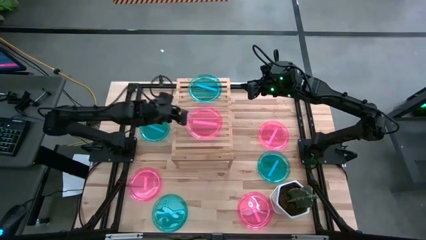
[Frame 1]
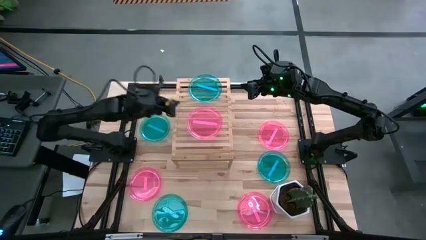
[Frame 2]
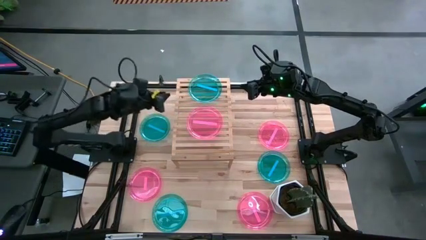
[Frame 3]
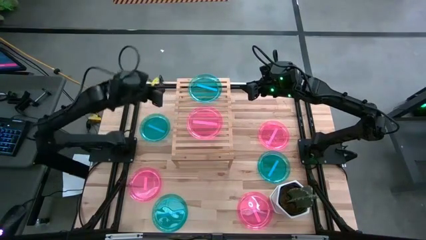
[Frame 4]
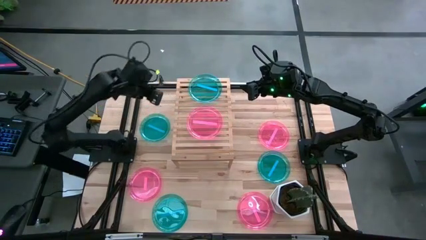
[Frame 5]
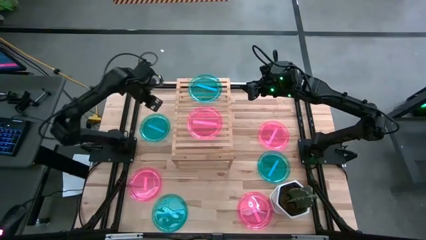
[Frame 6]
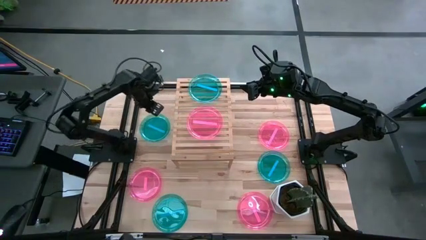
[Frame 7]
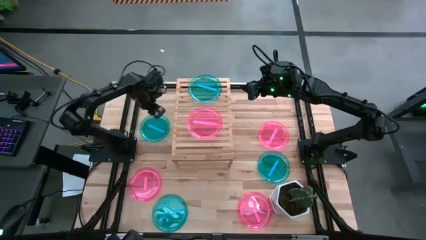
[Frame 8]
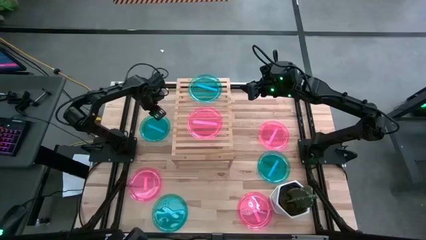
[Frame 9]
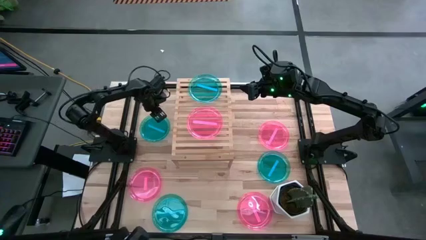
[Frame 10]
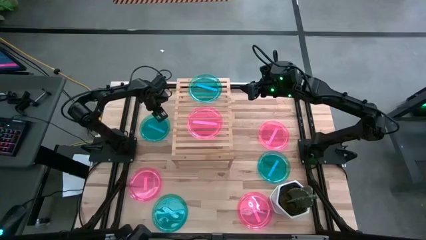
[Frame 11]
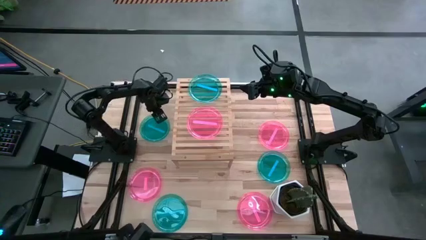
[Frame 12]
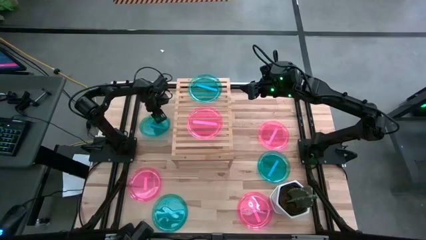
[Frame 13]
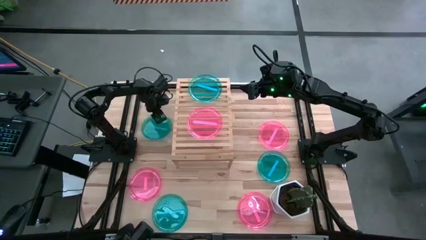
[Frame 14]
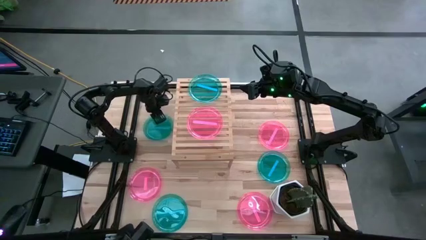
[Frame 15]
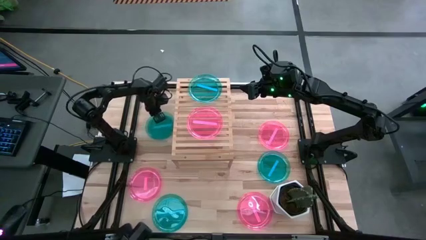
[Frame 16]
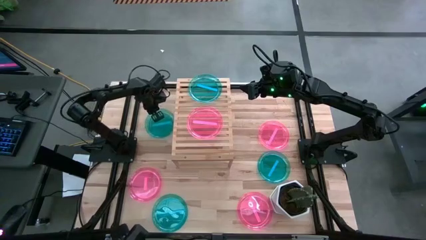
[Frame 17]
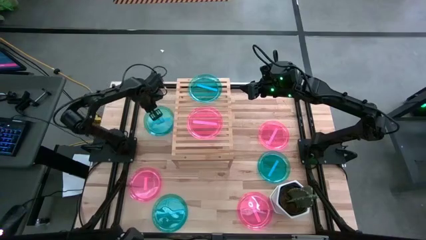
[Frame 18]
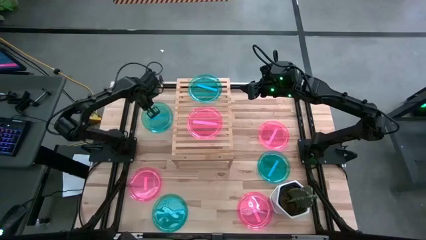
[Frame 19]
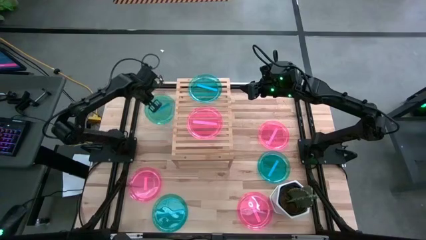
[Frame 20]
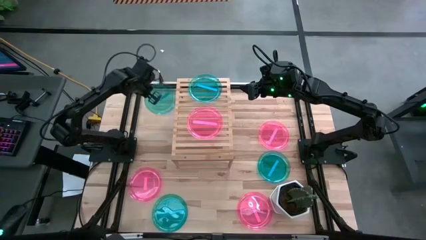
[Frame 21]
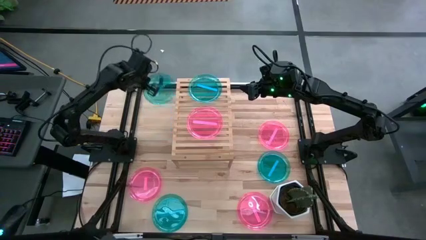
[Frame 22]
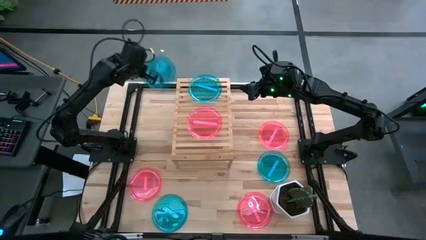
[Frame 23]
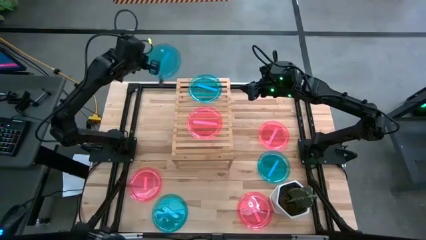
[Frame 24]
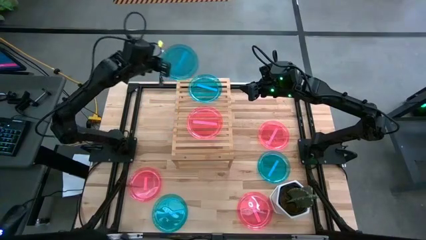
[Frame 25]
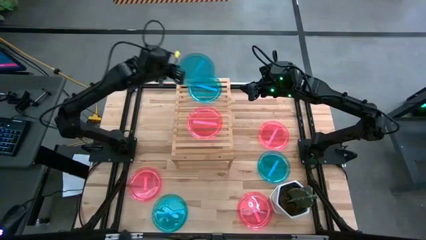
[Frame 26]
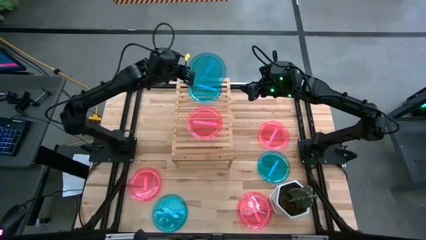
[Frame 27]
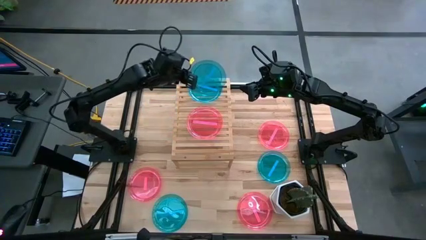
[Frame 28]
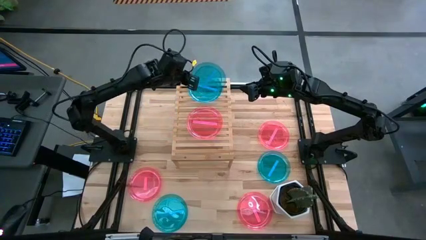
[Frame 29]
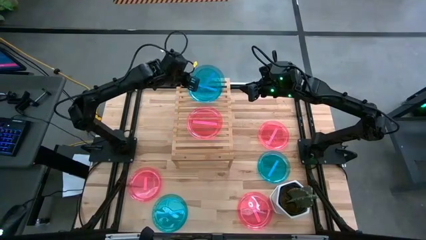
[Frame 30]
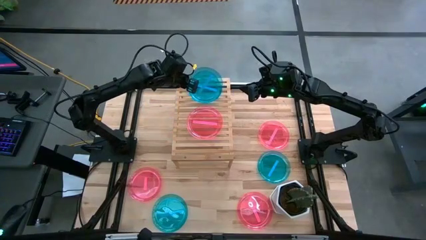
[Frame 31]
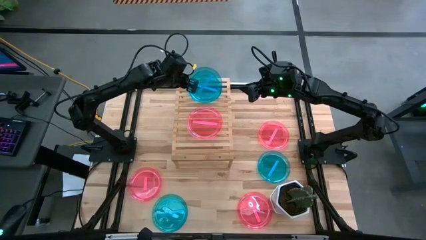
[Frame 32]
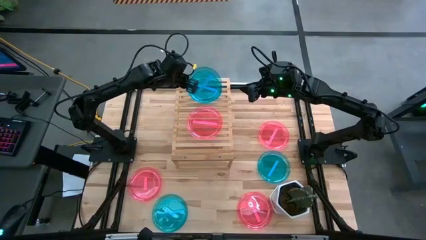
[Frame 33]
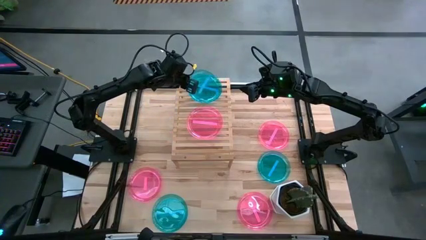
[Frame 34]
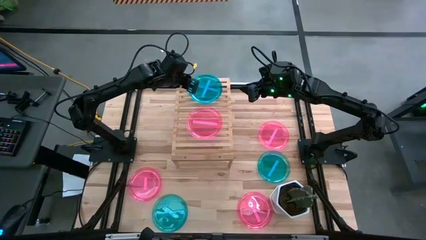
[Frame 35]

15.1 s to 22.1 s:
Task: Place and stack plates onto a shelf
Stack the blue plate on top of the blue plate on the shelf

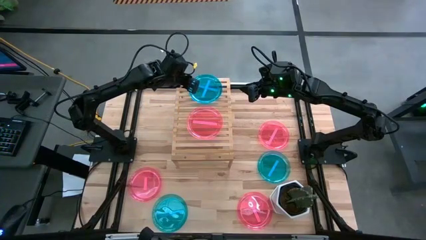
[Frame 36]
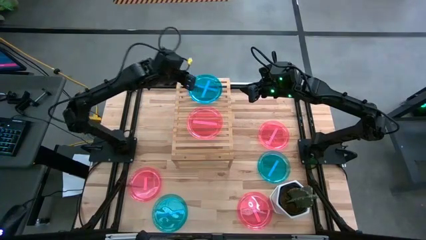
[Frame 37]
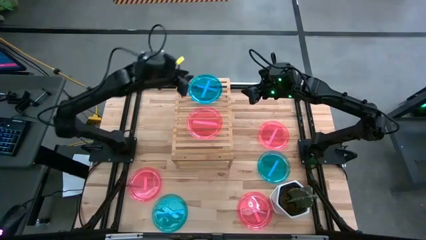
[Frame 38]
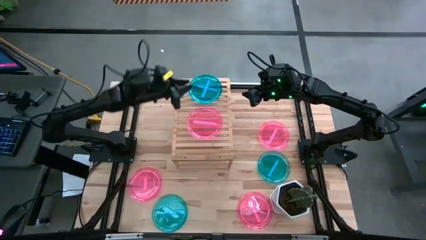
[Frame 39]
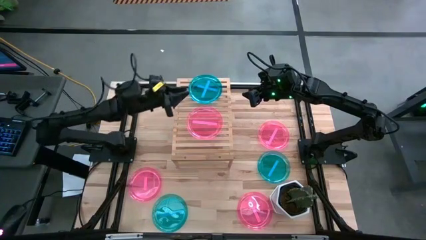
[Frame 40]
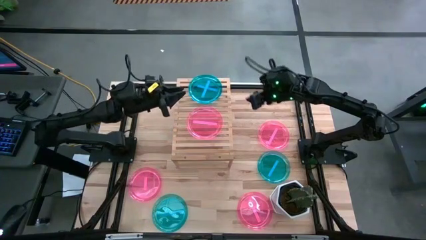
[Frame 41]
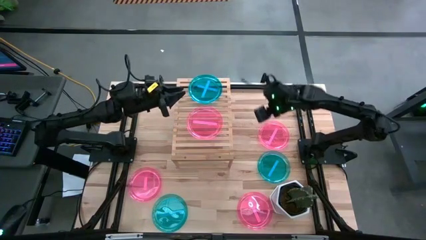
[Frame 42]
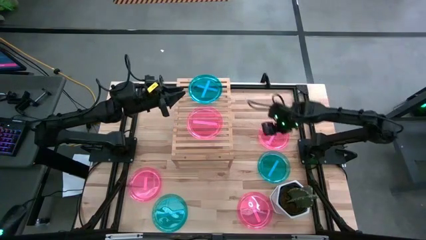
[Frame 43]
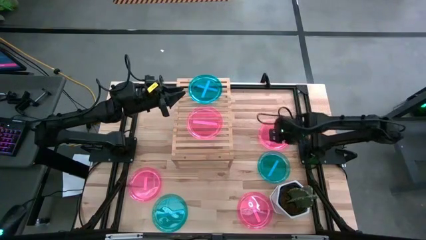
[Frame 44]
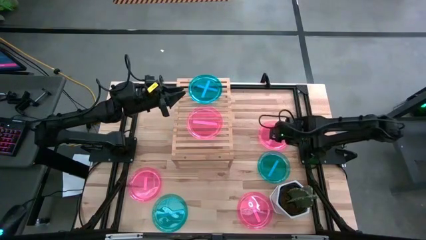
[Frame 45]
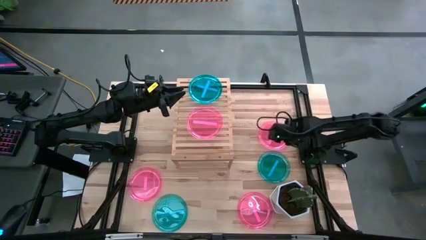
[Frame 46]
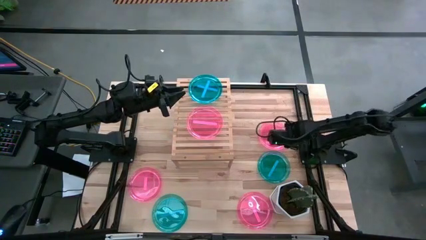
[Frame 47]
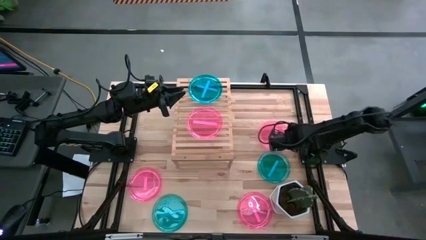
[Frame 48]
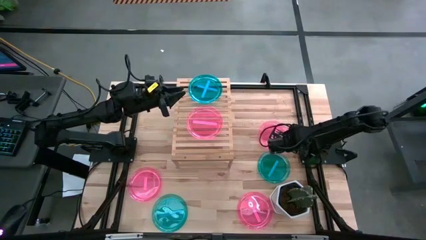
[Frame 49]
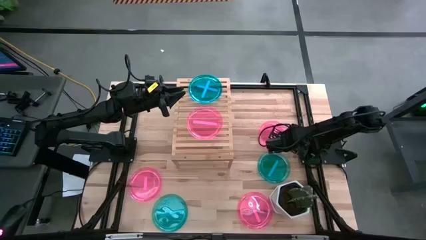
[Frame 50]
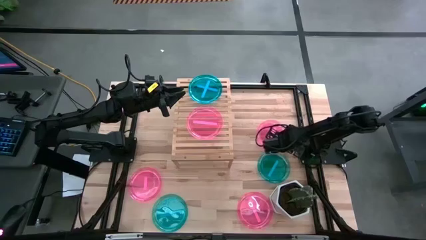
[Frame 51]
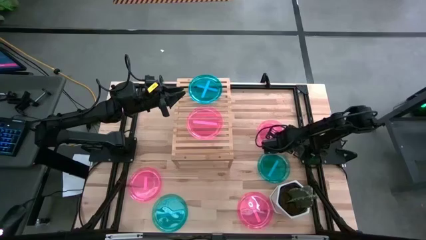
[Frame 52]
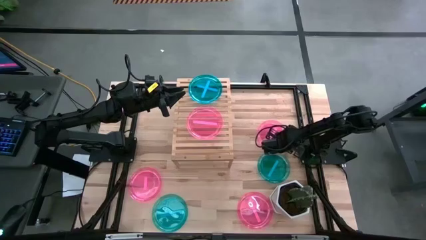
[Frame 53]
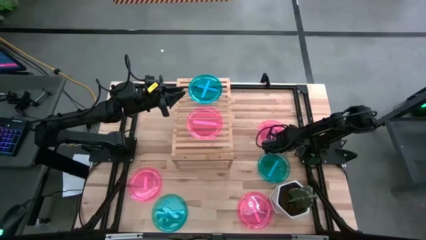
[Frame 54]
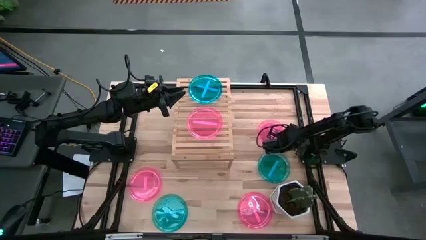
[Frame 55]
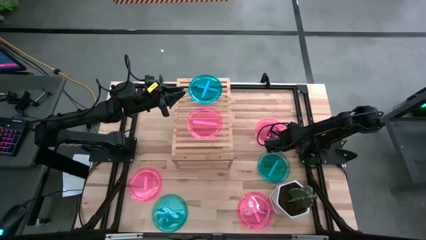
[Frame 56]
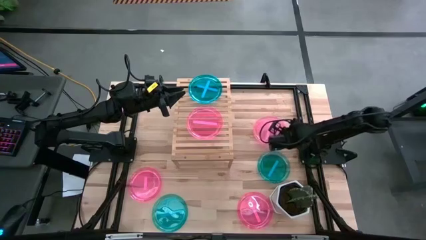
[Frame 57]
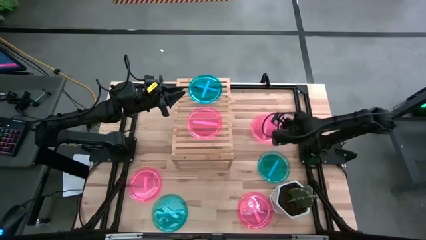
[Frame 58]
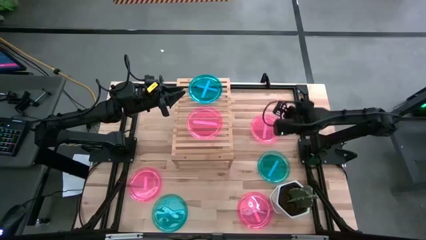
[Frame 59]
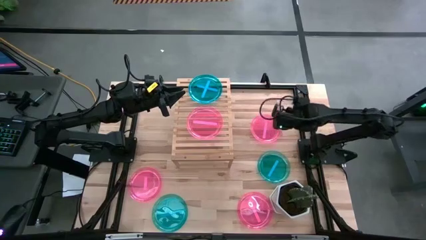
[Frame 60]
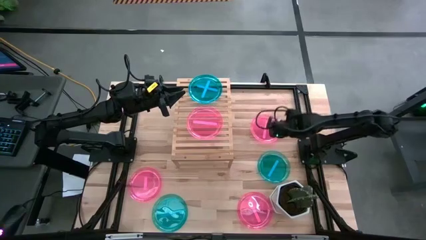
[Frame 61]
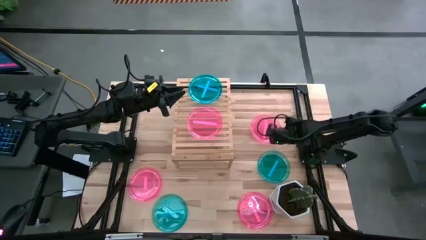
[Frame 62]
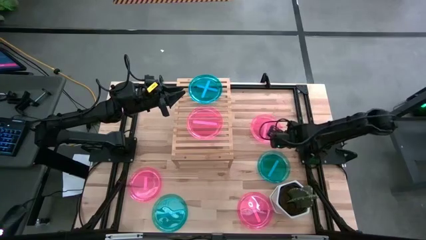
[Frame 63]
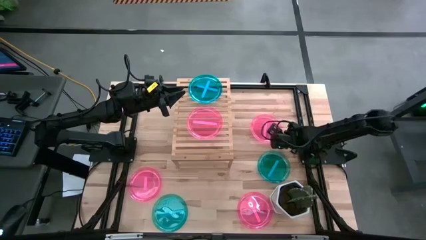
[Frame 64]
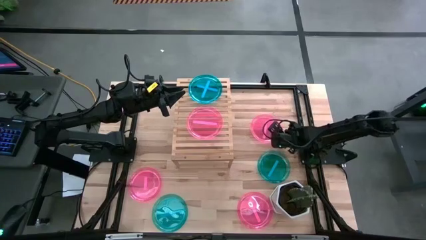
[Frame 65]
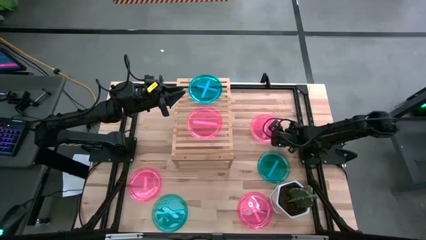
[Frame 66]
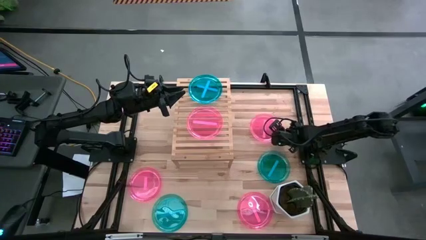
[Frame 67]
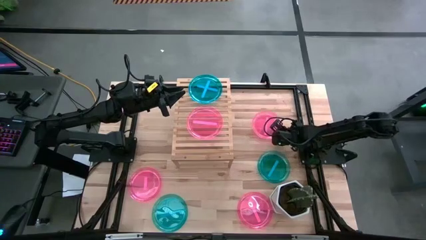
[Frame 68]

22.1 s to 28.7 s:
Stack the pink plate on top of the pink plate on the shelf

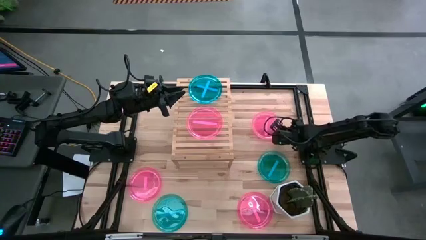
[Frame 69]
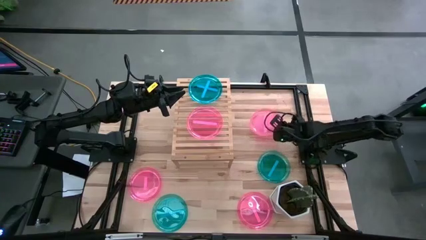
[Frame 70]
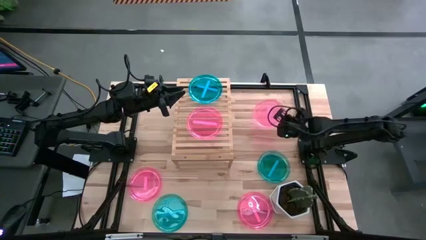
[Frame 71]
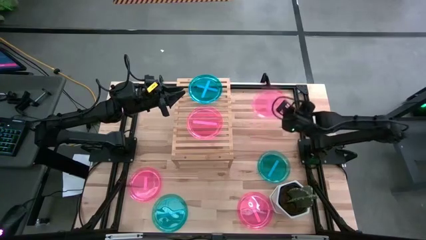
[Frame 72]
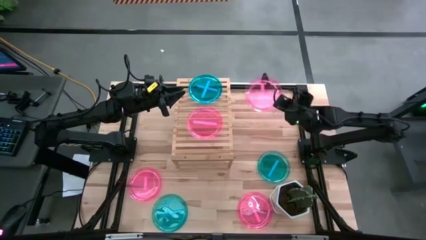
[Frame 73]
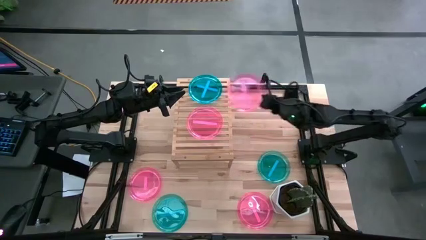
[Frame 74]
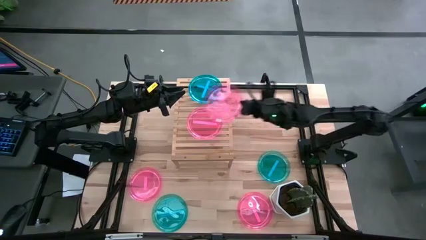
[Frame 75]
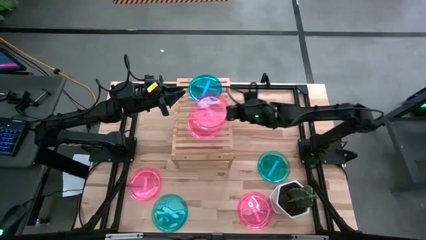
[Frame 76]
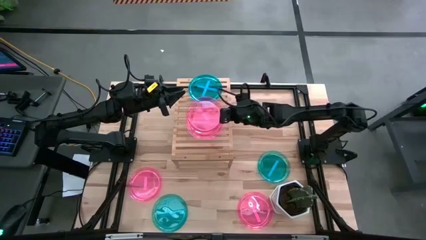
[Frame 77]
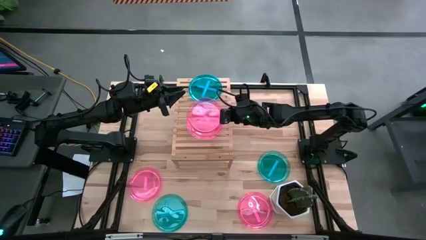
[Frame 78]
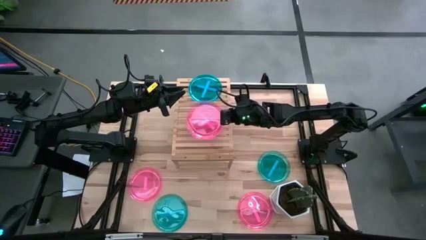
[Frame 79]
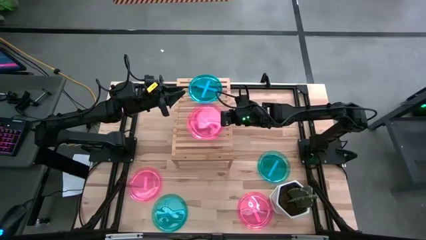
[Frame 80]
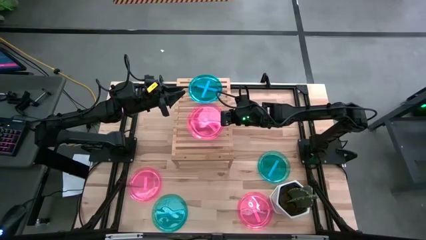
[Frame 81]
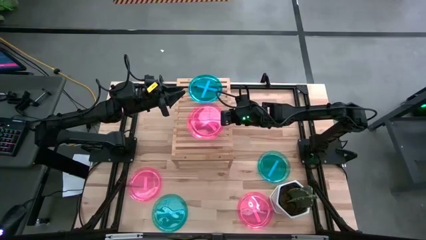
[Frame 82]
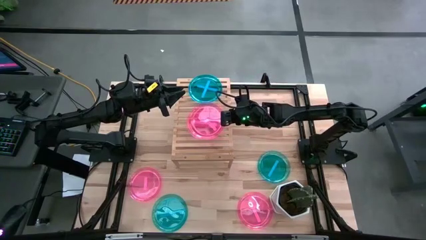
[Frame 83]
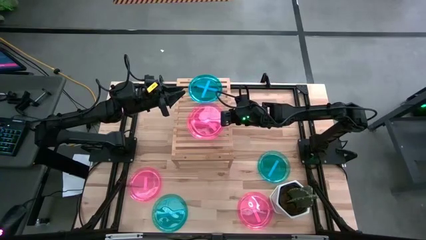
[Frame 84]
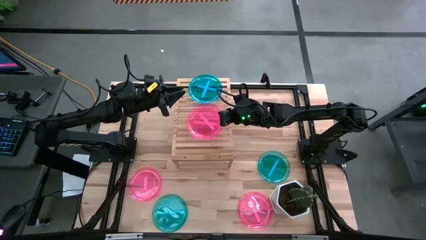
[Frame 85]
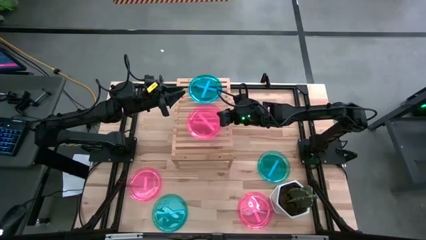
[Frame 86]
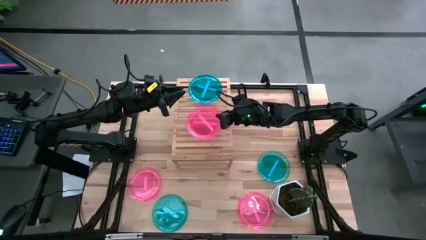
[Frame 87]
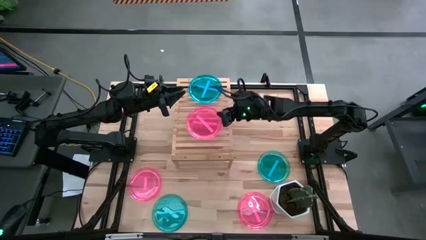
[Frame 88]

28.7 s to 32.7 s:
Stack the pink plate on top of the pink plate on the shelf
